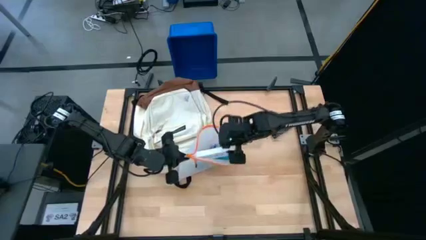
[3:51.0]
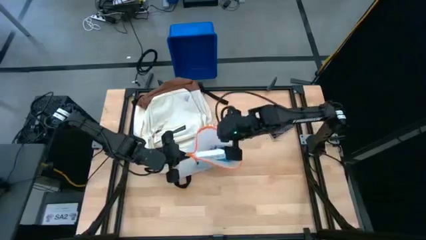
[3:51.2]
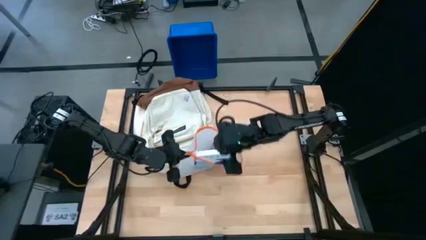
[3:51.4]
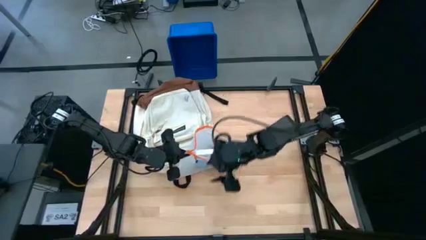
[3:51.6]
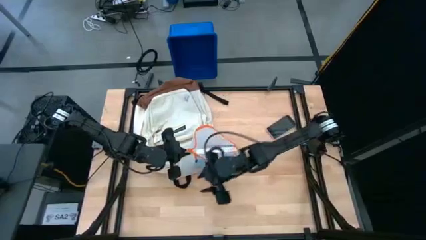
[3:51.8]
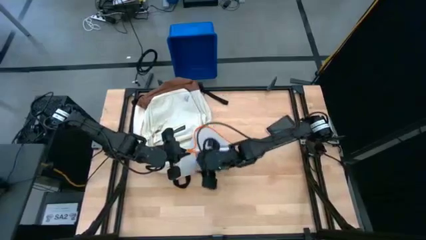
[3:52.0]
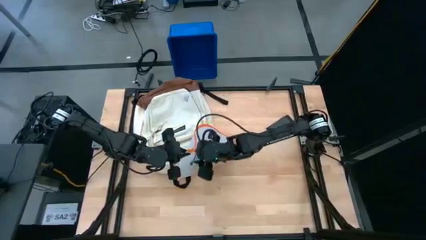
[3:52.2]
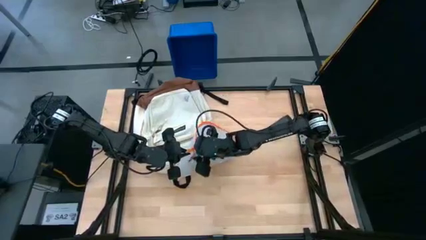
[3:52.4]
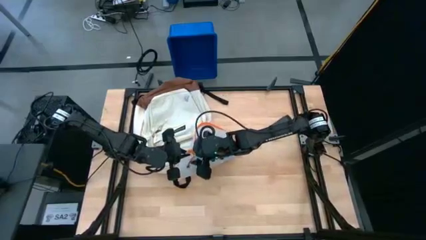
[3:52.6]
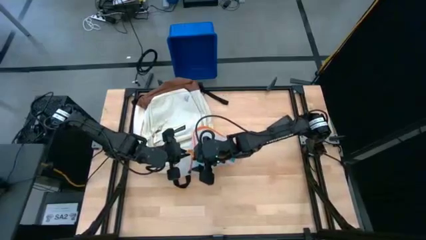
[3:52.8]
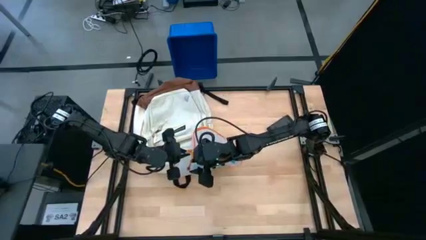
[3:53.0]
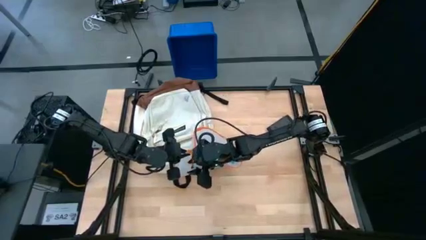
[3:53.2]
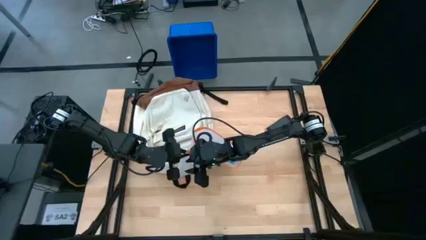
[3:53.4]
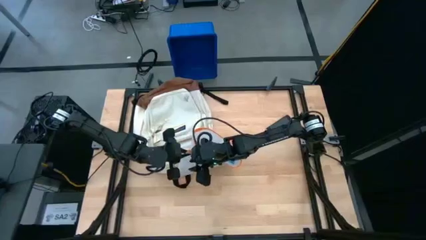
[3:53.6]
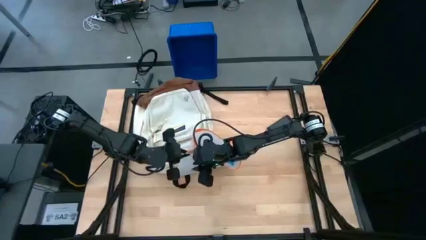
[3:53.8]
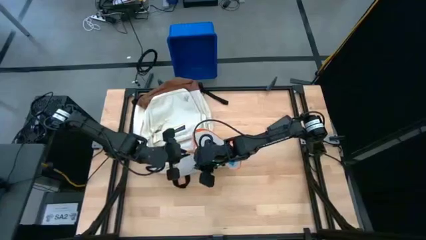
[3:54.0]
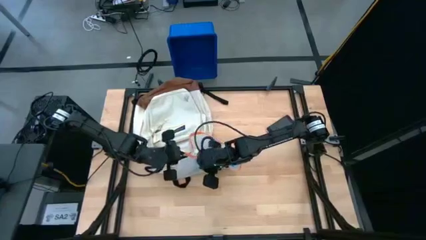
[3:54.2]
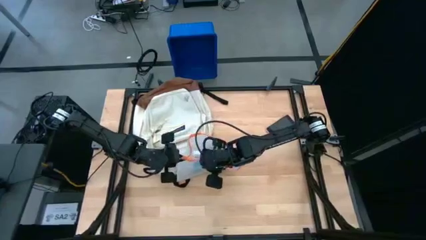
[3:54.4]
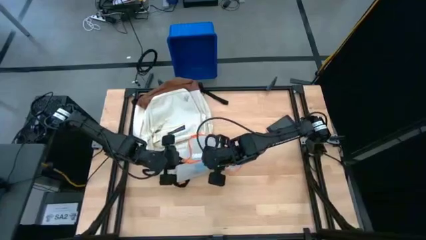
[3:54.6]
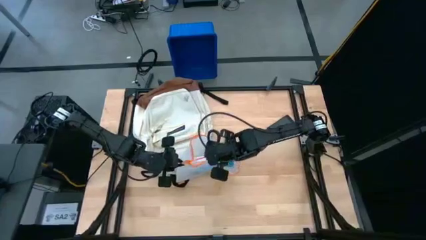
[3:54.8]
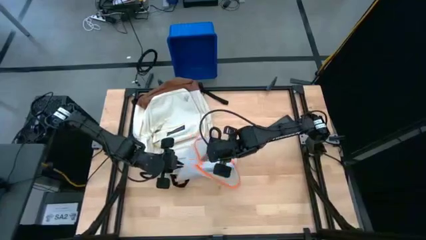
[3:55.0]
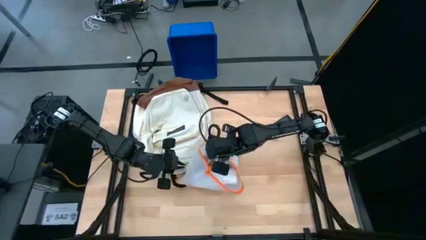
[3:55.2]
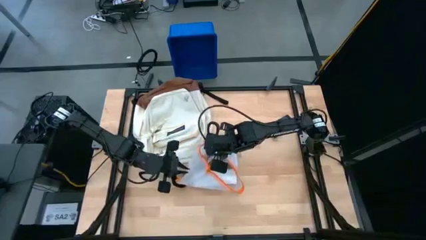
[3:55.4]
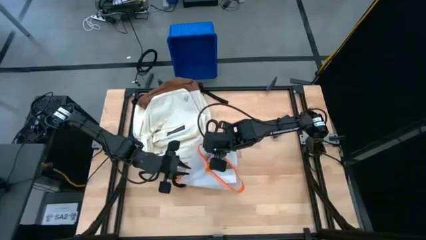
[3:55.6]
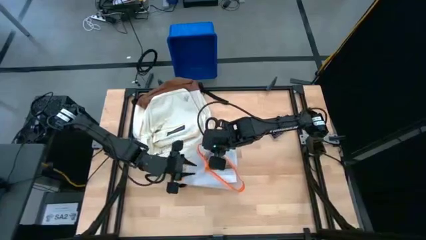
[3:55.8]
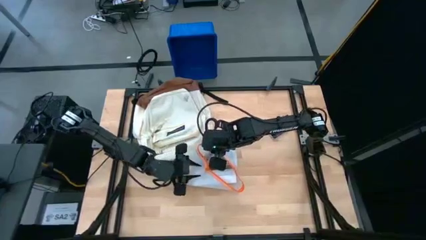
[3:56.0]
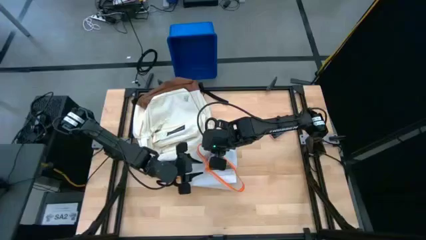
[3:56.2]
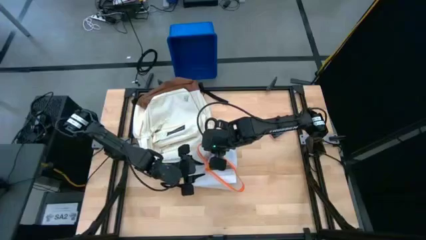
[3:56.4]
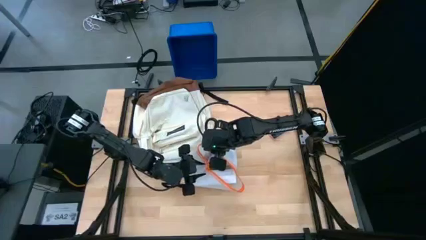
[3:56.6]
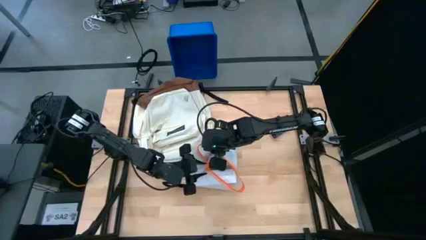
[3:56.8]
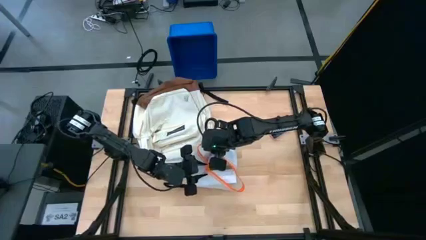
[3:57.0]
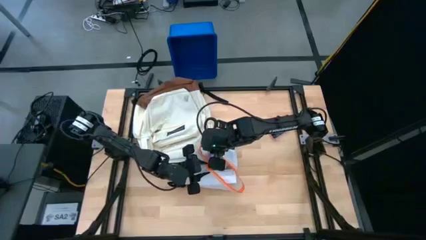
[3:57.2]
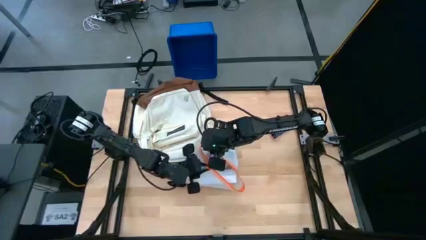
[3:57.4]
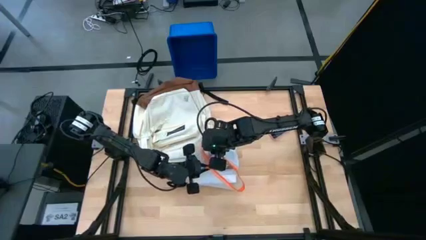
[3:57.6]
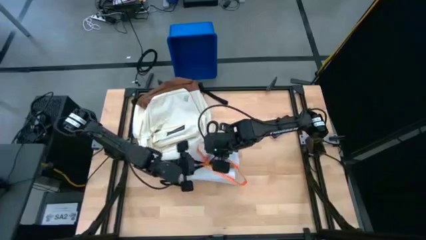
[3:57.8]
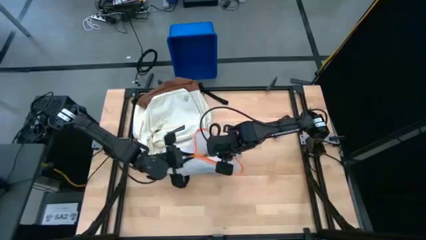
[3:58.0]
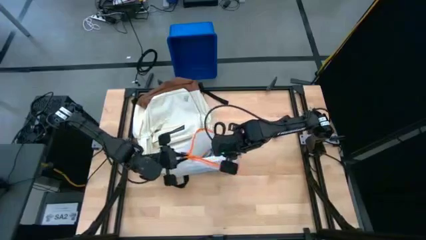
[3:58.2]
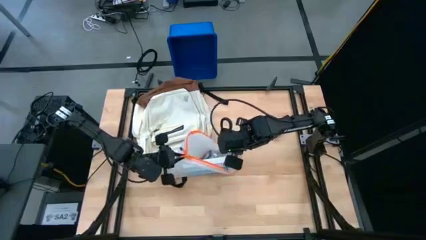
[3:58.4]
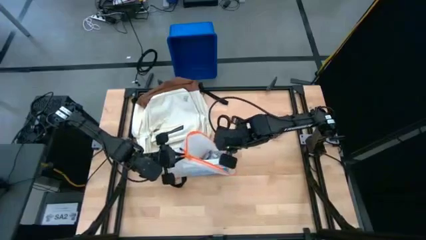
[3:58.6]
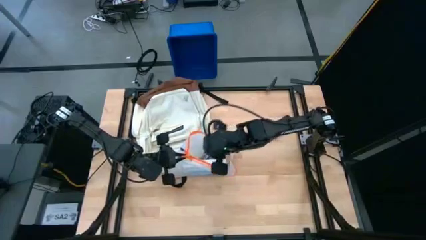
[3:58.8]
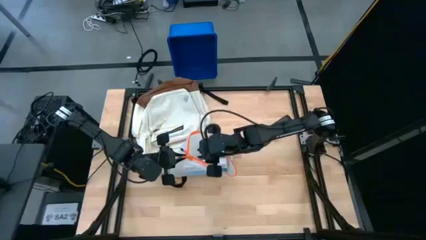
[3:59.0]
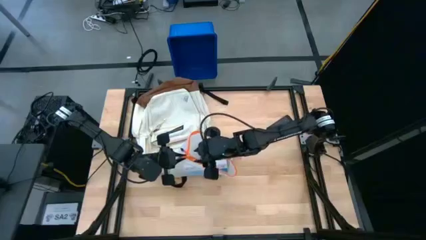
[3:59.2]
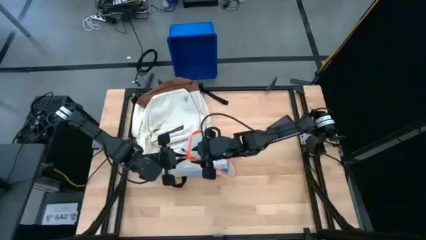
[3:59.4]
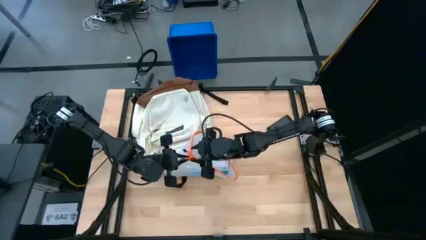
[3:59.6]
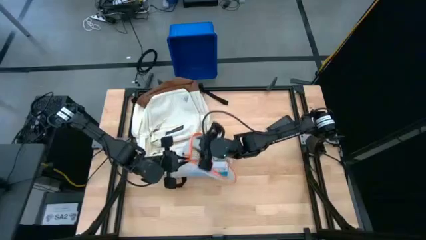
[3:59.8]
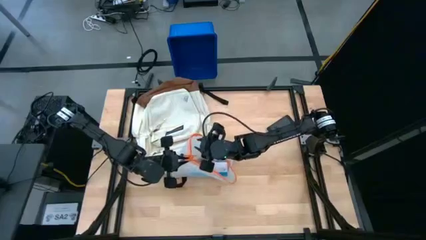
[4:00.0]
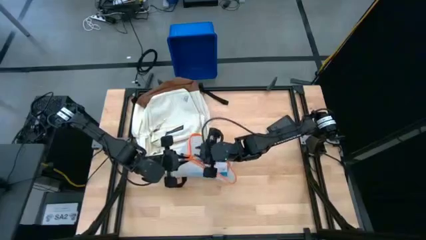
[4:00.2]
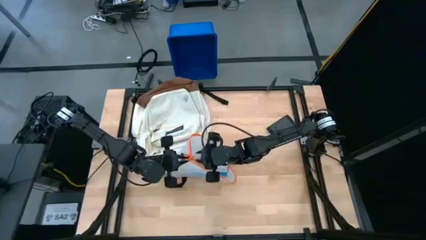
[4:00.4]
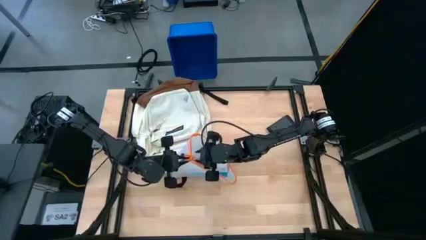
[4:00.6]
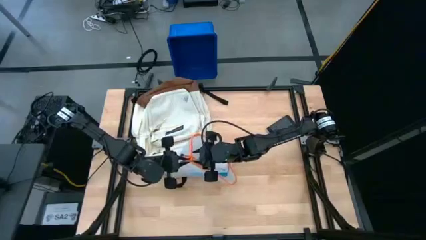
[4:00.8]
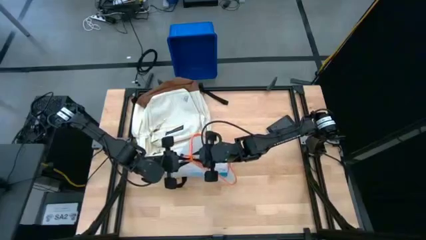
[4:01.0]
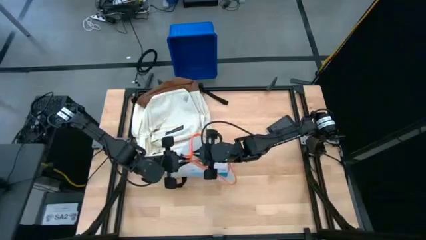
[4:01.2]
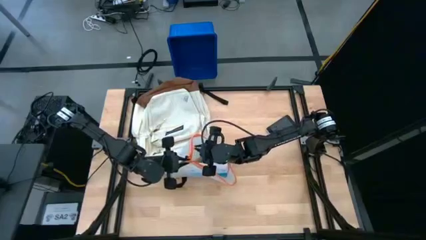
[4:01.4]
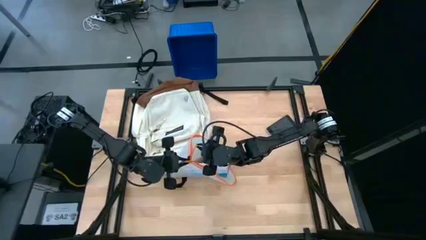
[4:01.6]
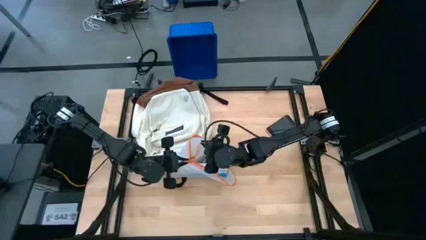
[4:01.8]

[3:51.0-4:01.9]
Task: Unpack backpack
Close the zip bag

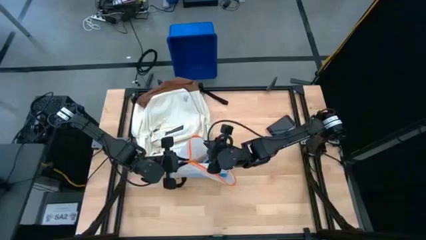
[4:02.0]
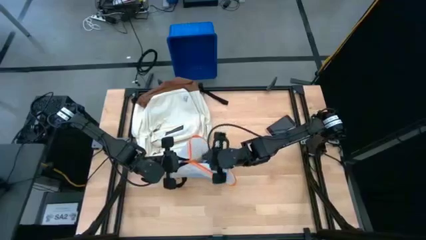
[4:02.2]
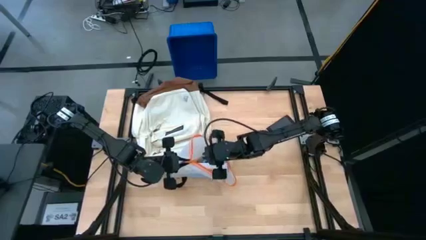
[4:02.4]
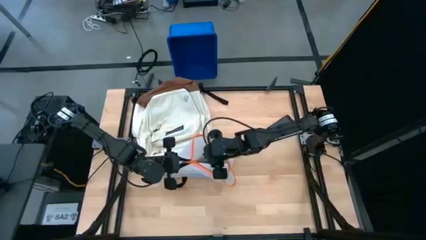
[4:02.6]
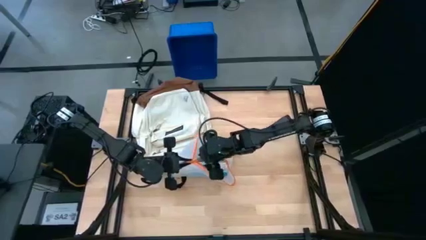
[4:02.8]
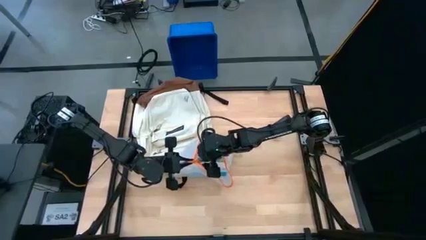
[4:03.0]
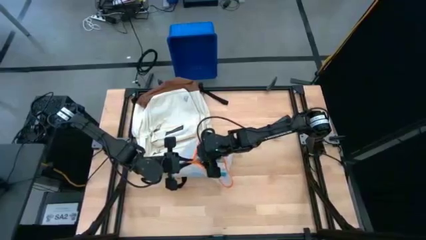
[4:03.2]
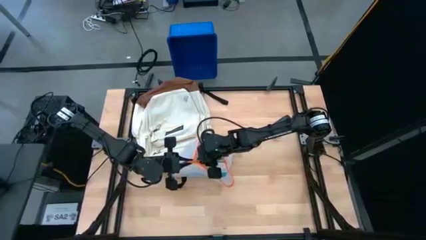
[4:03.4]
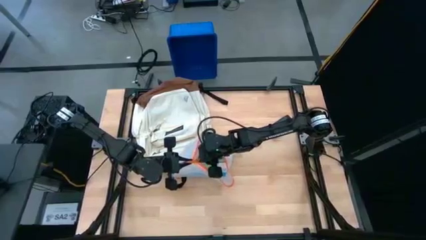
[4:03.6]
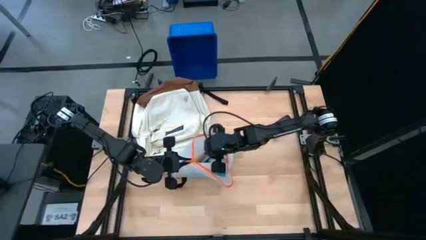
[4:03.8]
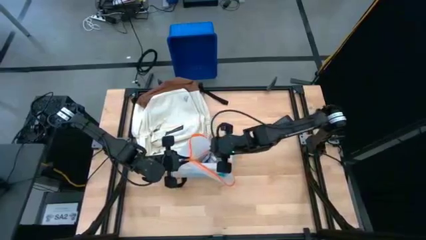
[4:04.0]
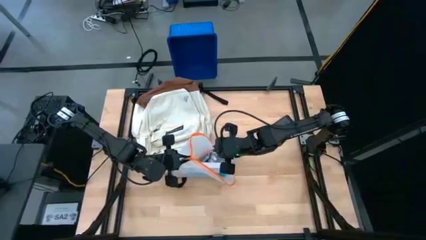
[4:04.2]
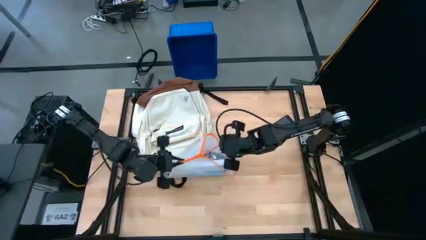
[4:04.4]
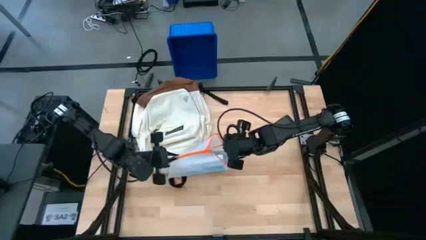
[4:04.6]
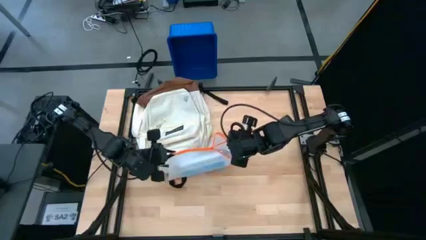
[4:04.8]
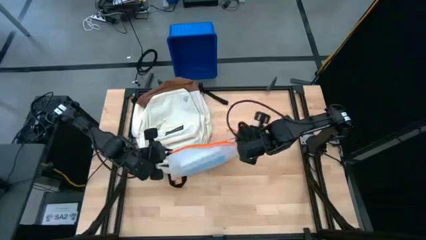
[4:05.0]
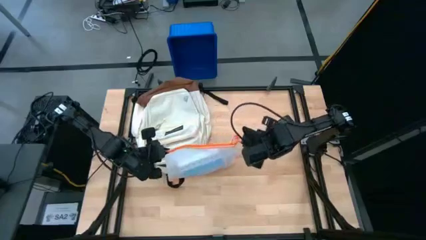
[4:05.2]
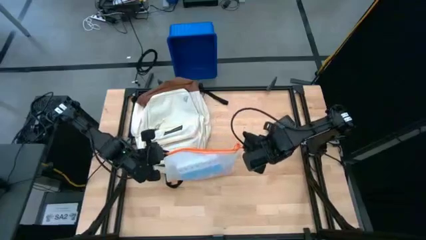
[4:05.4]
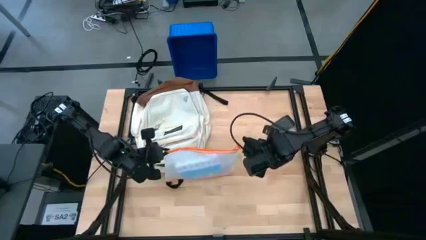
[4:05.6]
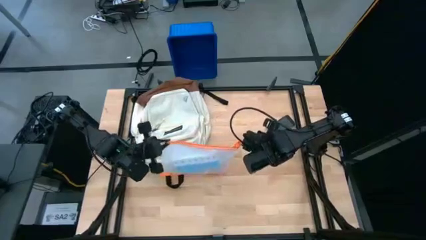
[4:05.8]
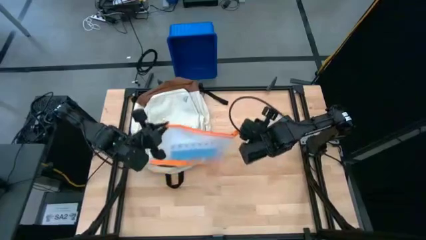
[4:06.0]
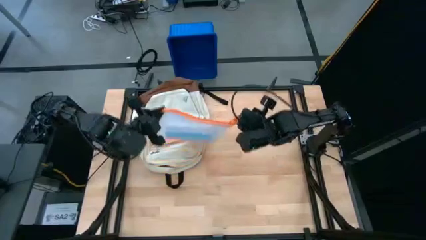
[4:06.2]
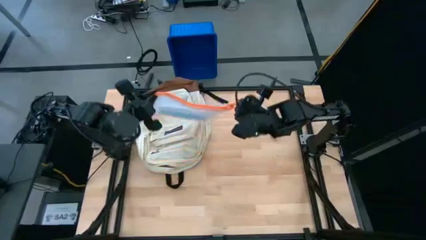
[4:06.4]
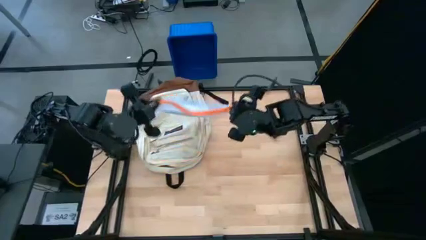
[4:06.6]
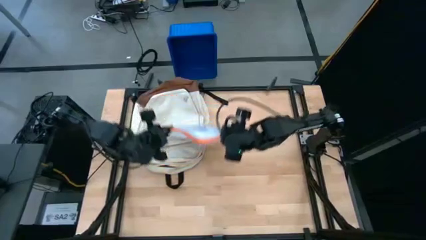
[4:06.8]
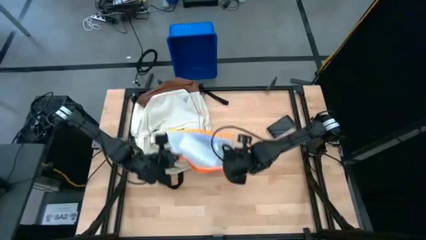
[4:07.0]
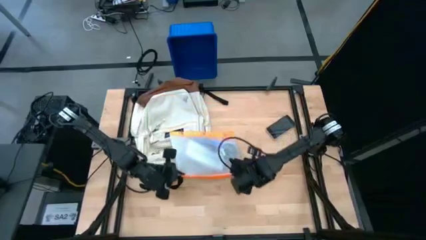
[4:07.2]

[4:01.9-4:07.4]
Close the zip bag
